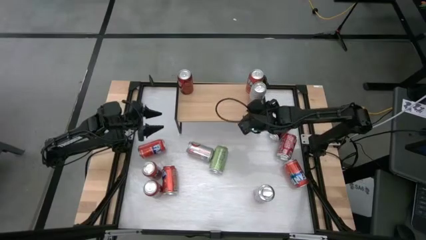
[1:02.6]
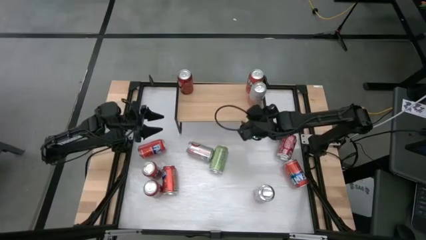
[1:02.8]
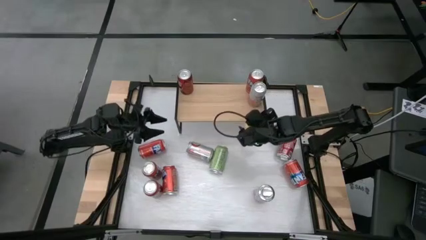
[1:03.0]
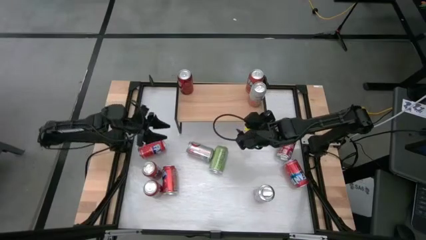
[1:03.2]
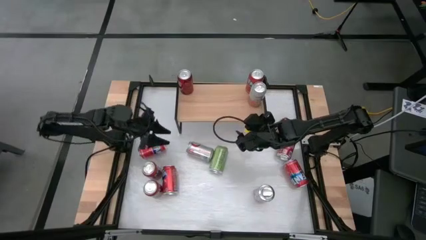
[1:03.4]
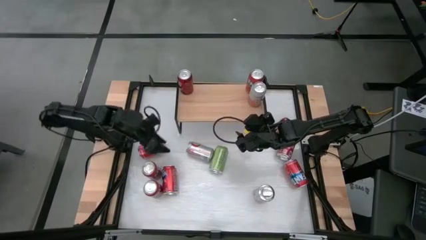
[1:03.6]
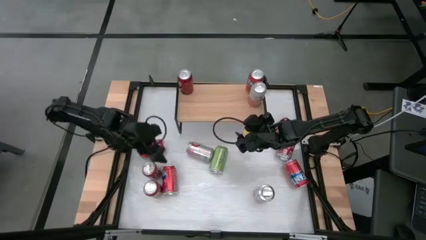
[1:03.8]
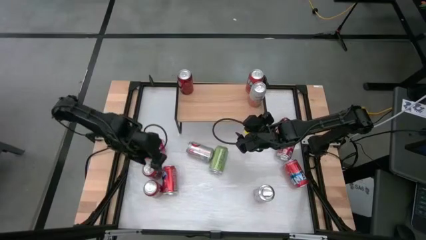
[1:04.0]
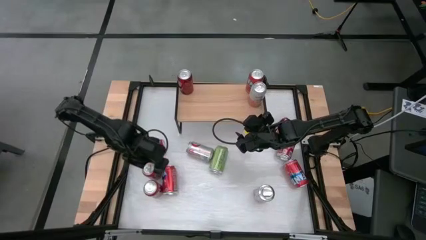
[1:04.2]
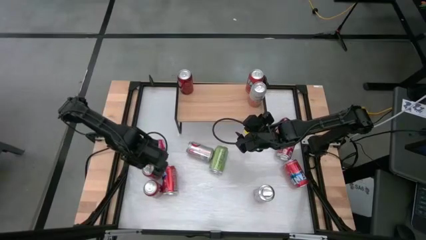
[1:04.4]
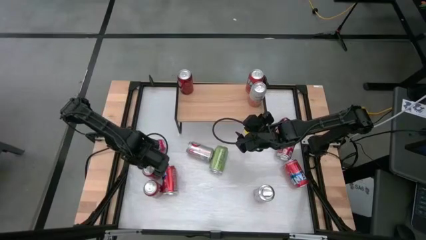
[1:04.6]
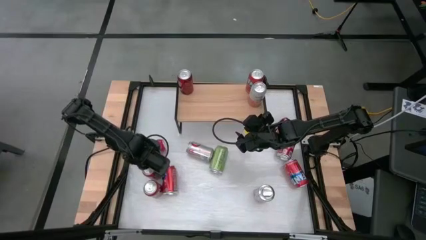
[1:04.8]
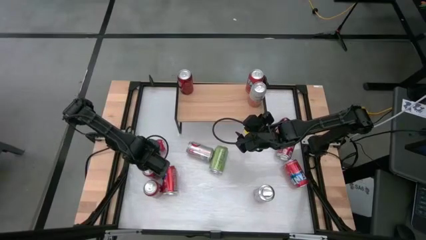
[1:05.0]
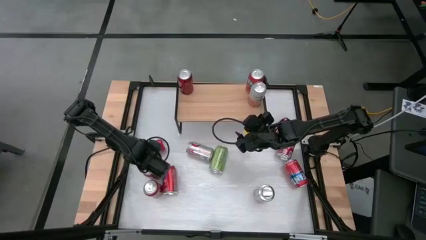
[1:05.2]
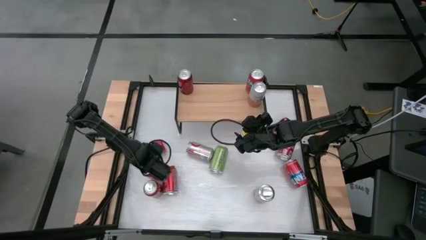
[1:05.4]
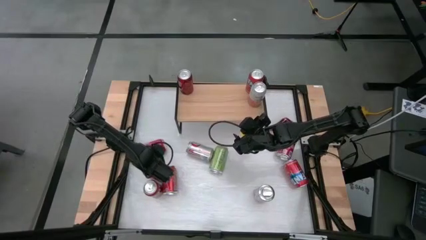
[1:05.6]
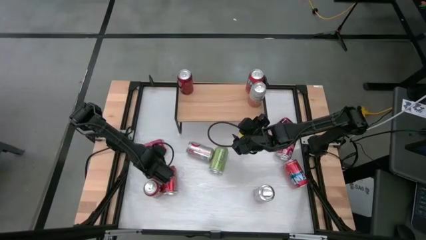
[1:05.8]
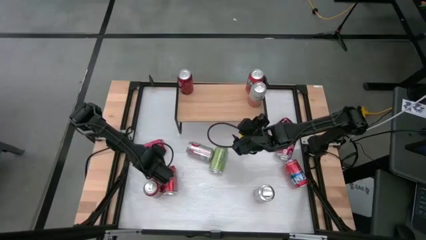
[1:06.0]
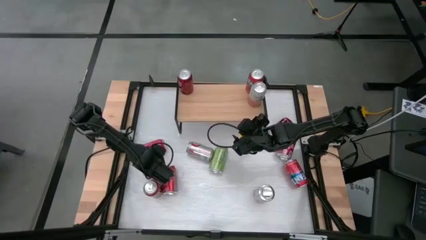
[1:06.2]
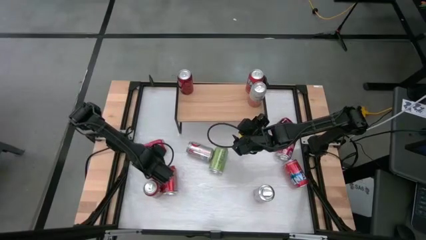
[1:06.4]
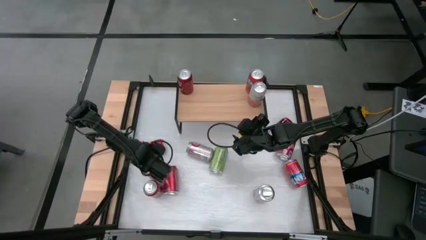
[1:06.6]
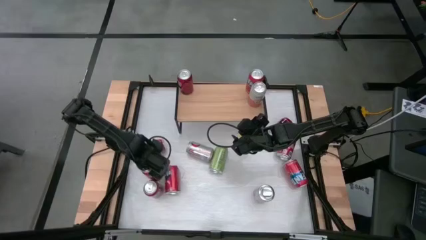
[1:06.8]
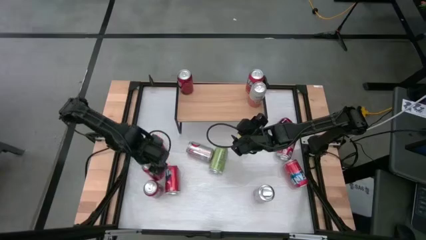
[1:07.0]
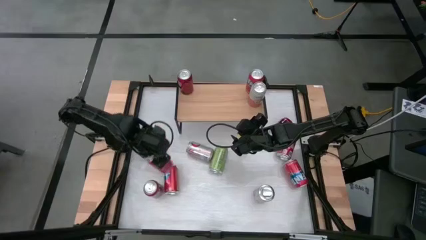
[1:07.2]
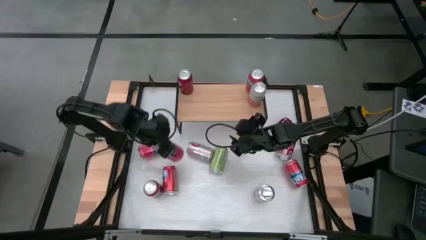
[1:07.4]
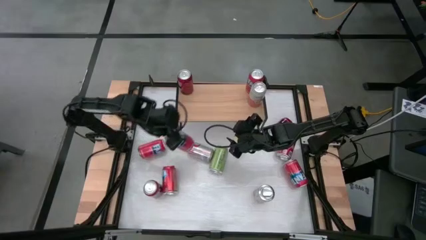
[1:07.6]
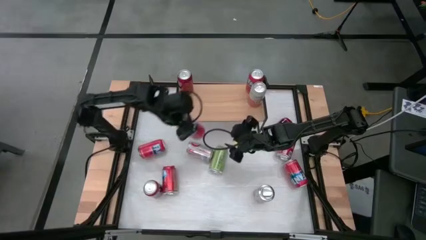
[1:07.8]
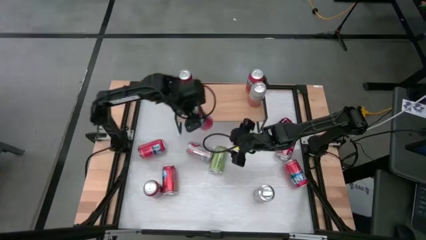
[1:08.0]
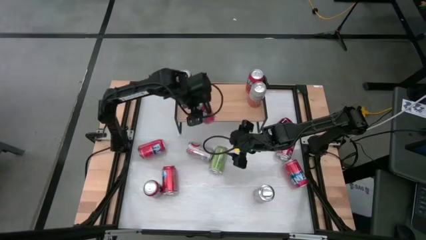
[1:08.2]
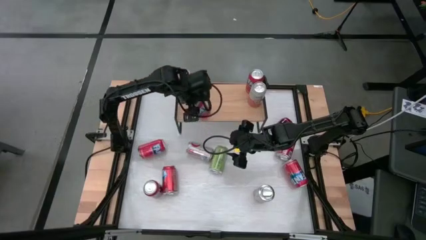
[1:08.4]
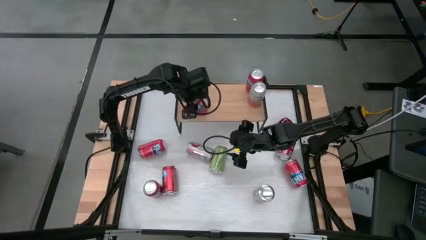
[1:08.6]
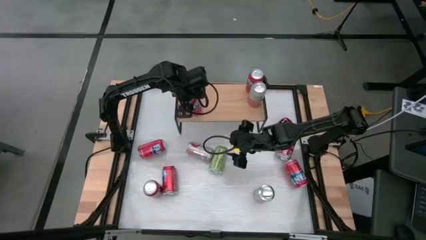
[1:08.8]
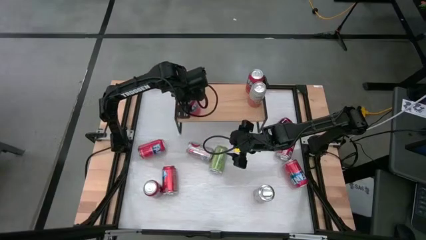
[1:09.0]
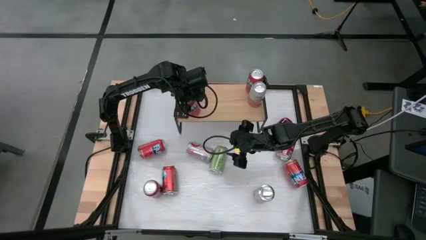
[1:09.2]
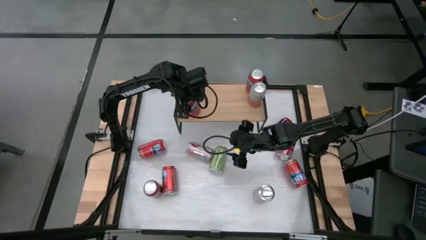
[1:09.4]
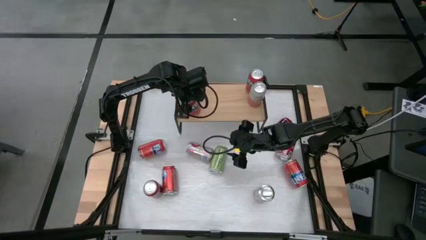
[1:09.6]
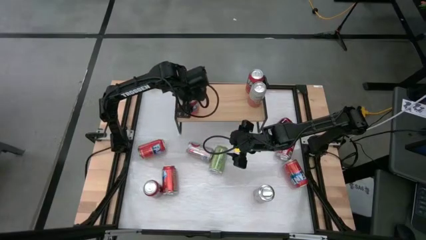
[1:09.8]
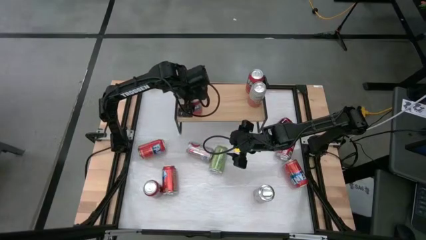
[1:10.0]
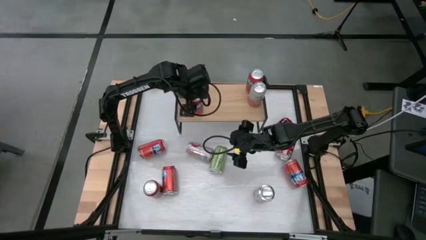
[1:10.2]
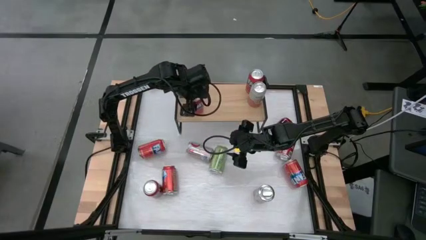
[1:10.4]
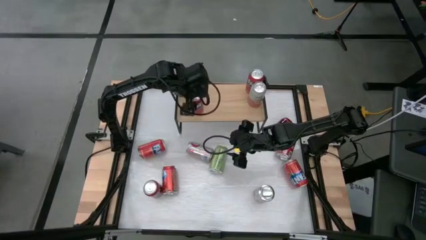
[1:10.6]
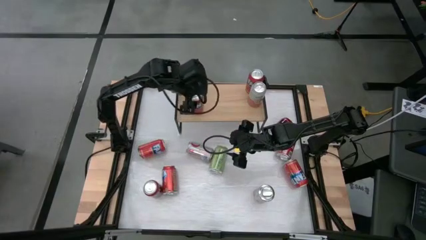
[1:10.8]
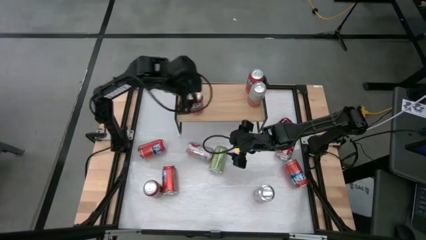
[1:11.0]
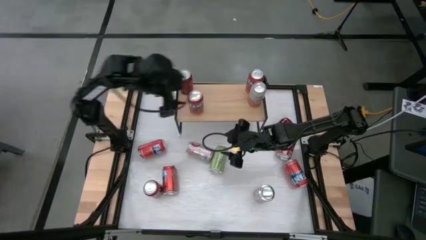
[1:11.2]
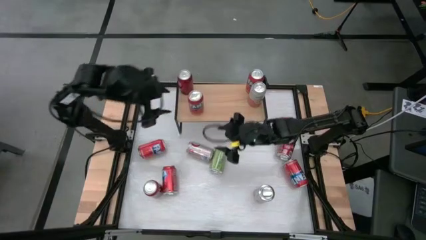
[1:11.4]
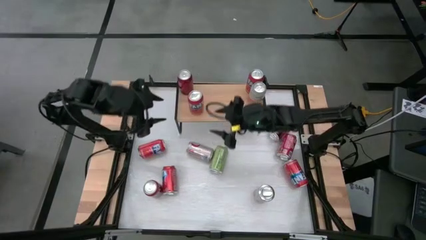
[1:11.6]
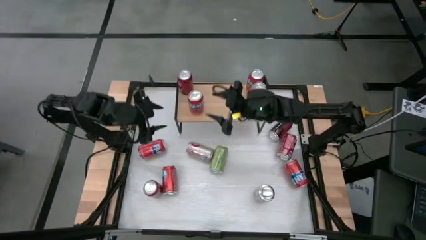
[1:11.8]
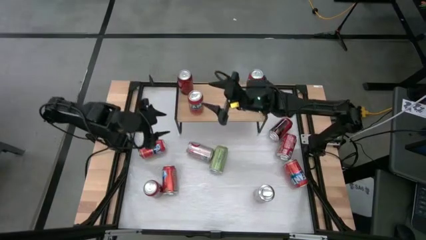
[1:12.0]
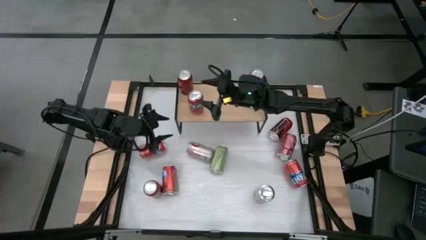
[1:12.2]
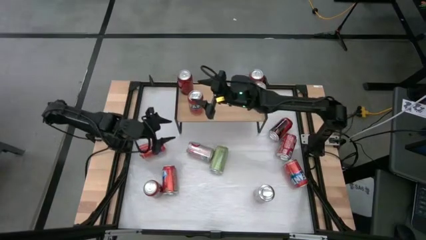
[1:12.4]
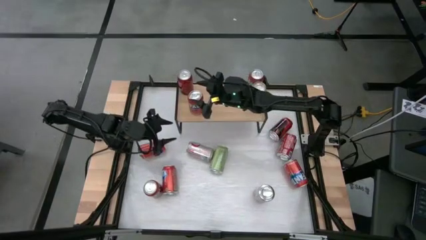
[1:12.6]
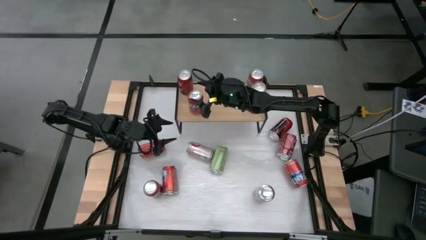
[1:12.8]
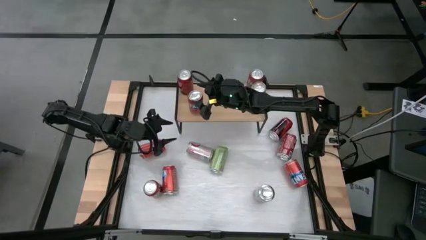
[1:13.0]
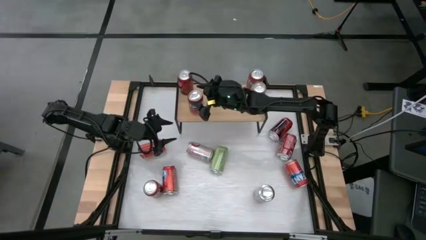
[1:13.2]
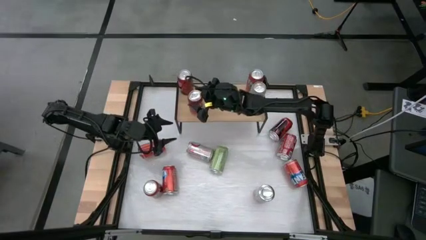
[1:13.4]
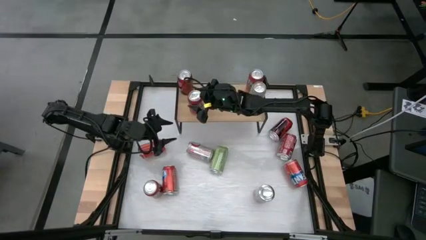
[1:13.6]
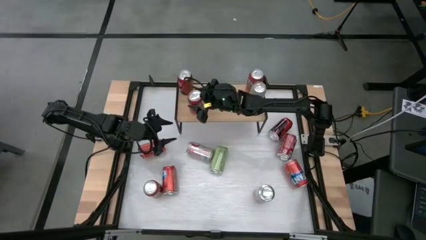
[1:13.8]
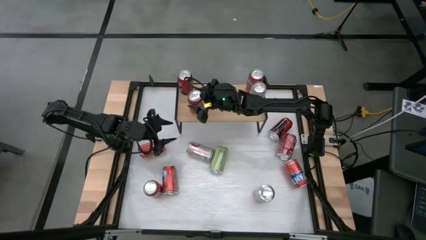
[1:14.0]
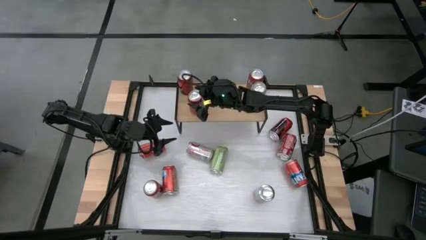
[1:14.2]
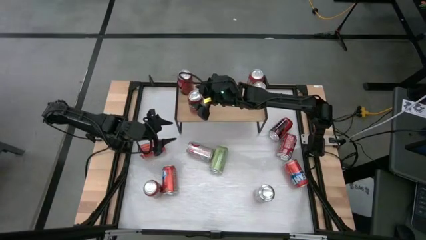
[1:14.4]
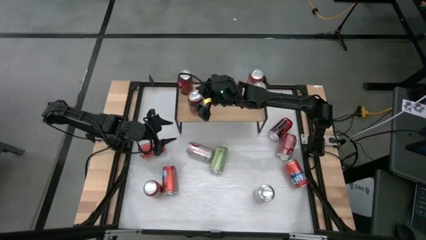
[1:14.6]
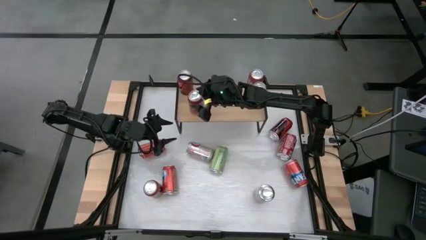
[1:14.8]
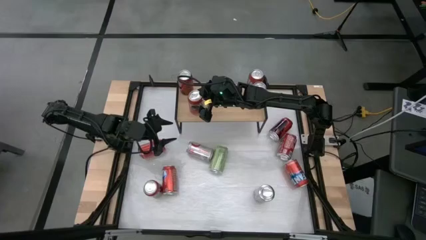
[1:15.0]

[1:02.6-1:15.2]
Task: Place canned beverage on shelf
Put the orange soda can on the shelf aligned with the other orange soda can
